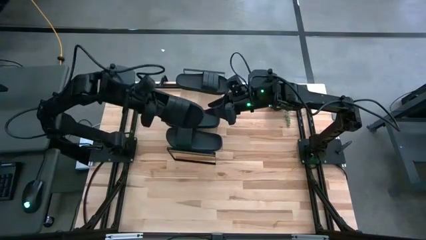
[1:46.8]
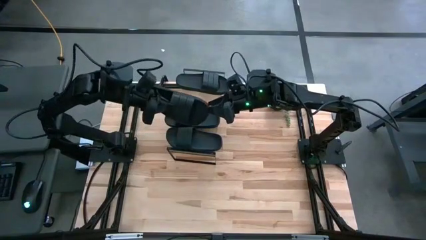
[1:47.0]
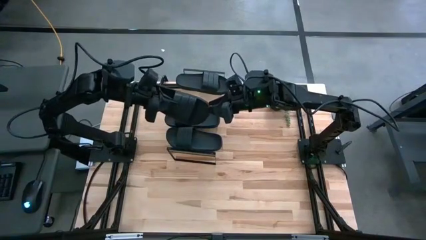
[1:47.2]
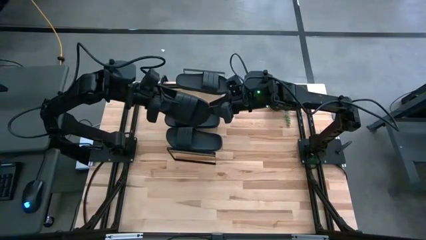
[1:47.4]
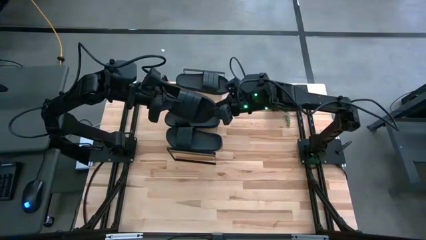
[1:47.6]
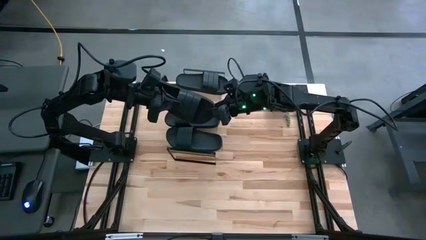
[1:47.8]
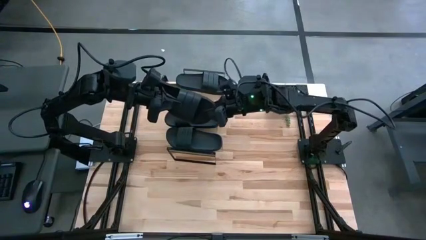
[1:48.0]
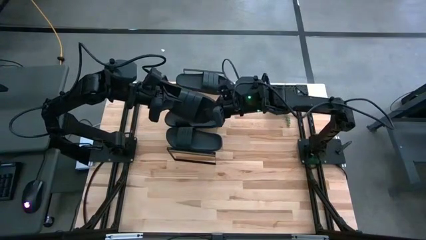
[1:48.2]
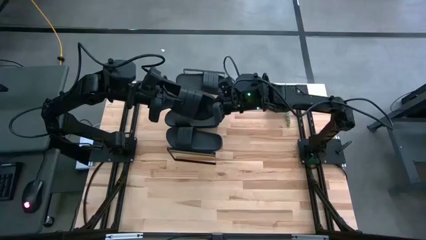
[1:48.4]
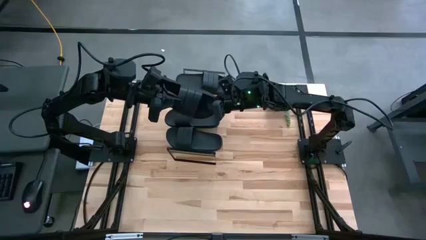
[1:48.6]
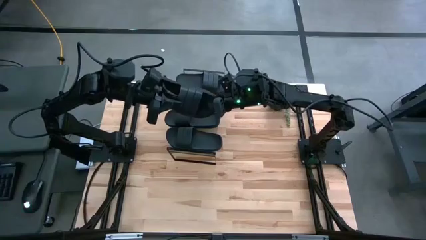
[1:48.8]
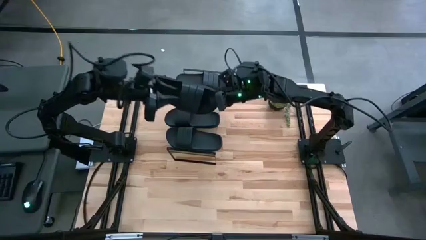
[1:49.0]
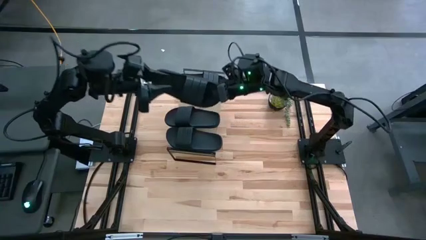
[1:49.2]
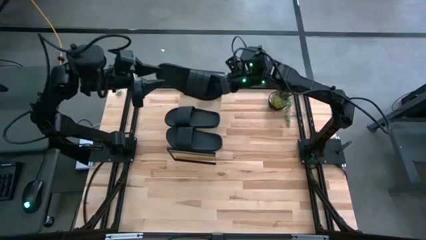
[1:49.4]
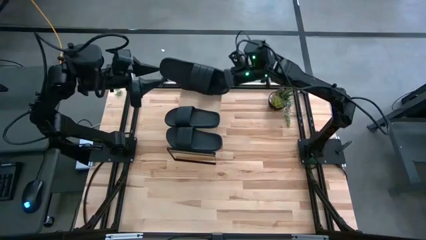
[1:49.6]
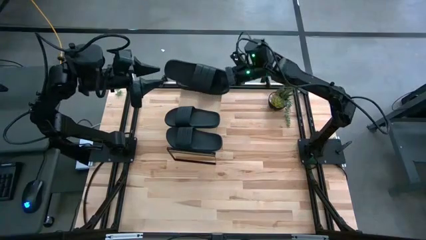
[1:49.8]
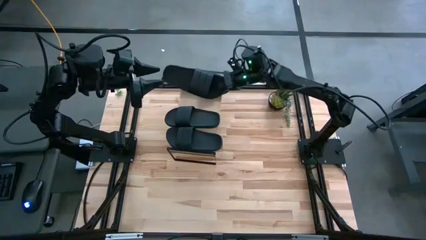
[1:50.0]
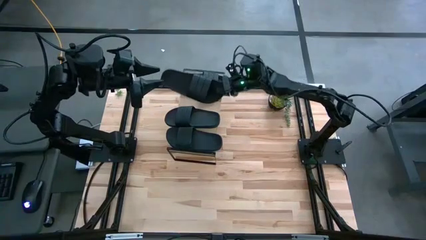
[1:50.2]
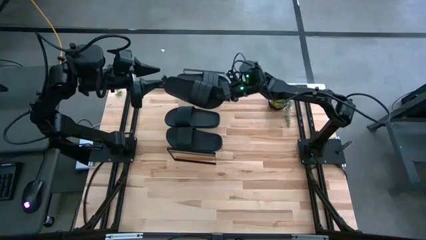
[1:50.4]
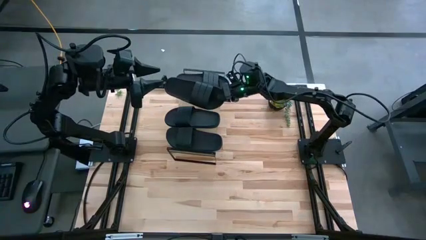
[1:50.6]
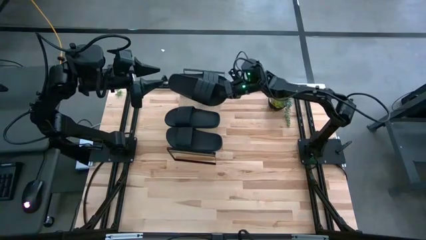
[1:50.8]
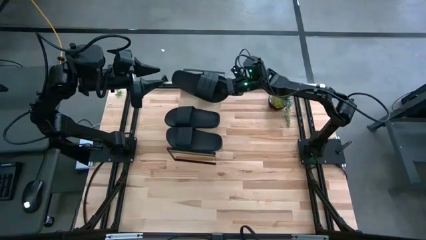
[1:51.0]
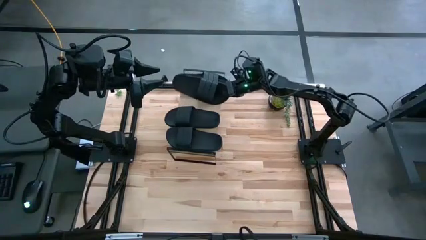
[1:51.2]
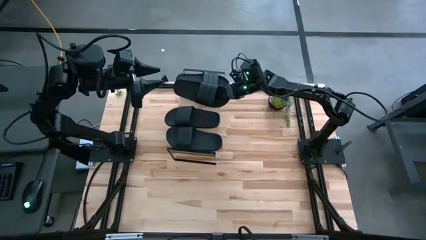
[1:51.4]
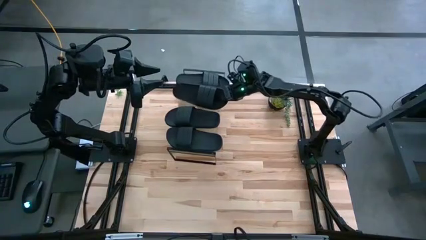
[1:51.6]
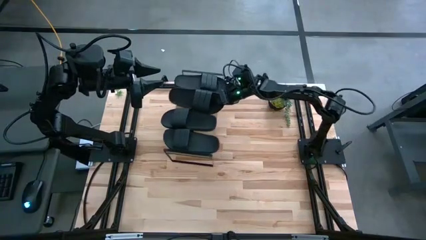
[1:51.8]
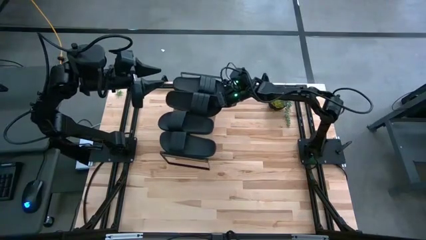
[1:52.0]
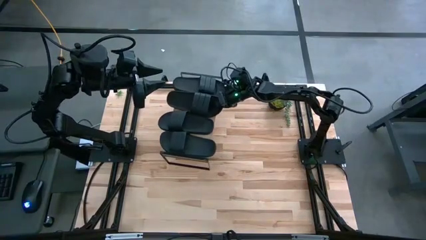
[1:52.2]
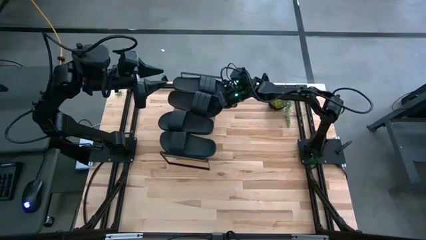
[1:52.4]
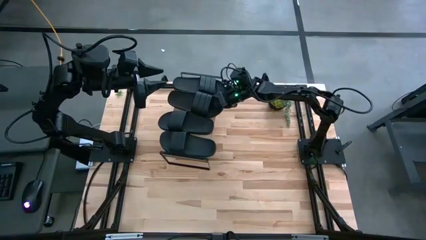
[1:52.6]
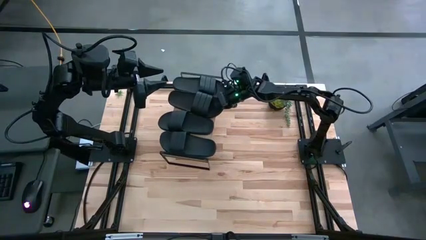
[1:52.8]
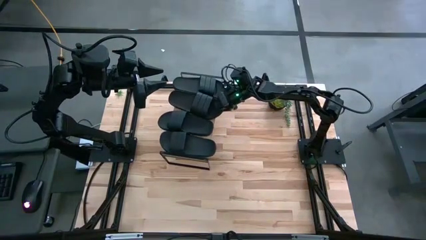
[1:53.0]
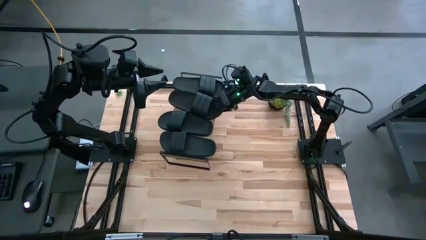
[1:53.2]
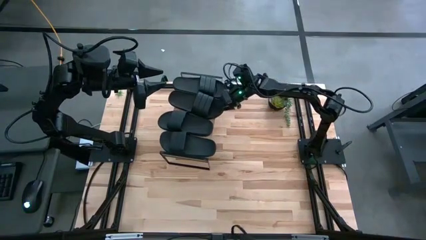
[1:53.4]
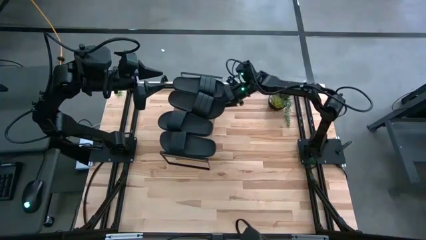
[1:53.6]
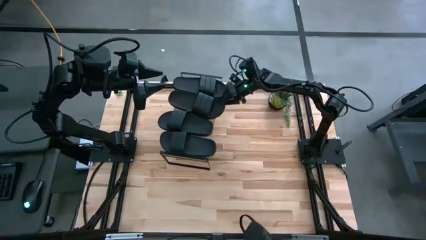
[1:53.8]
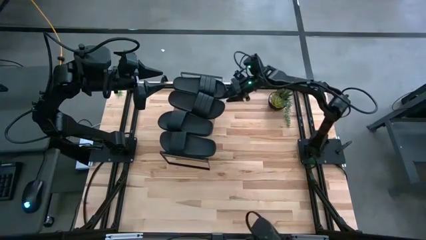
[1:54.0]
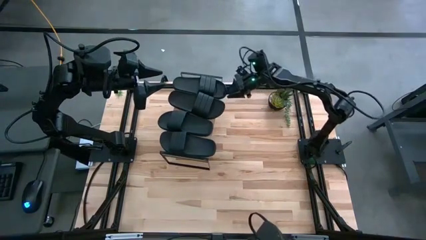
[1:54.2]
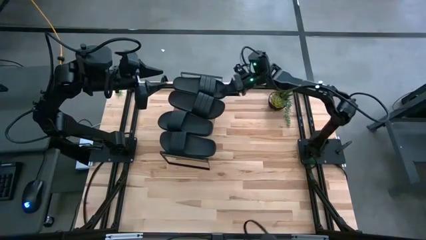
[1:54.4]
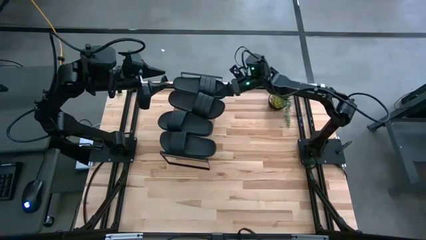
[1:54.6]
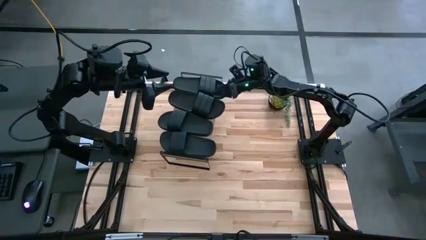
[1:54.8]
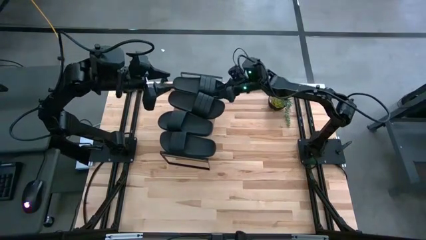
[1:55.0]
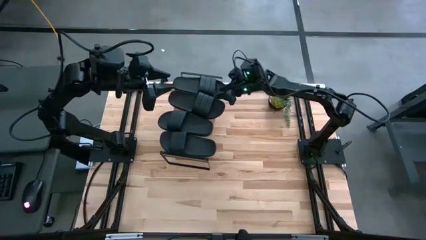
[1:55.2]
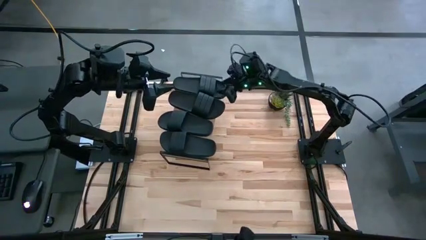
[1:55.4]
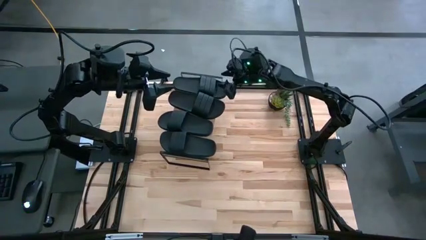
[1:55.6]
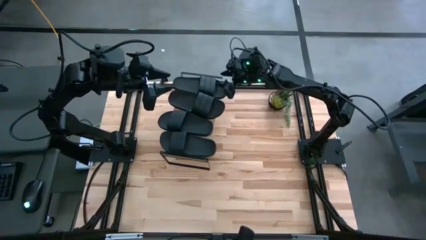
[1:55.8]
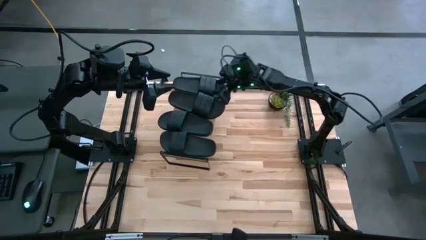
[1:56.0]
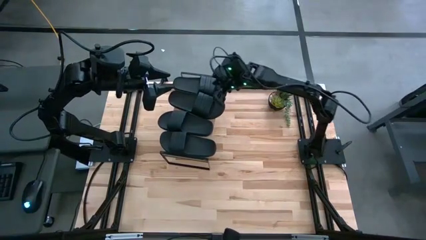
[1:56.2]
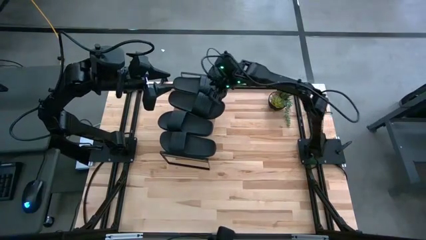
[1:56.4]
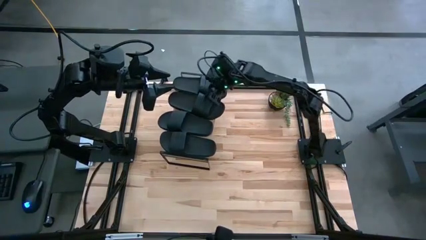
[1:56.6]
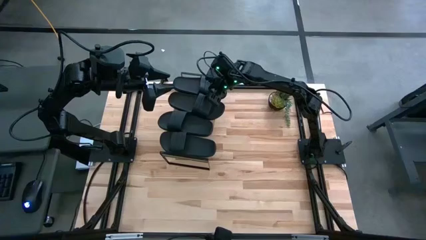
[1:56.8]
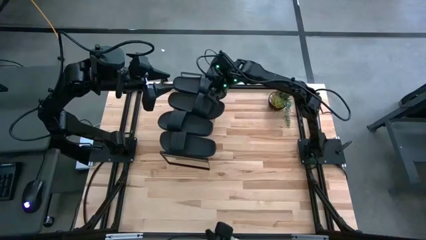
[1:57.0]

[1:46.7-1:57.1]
Task: Pick and place slides into the shelf
Put the slipper on the shelf

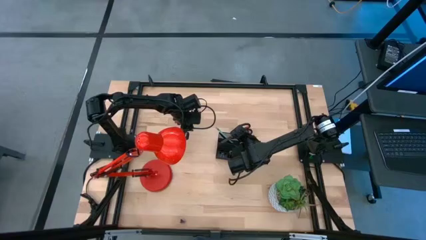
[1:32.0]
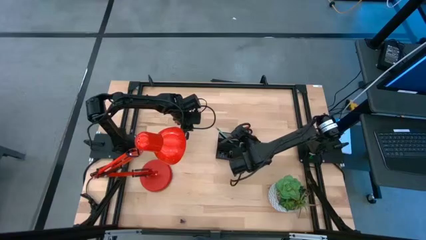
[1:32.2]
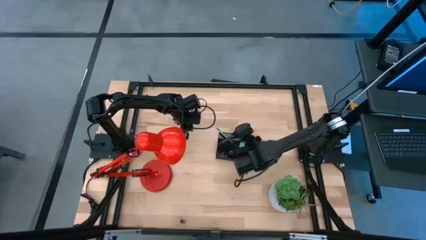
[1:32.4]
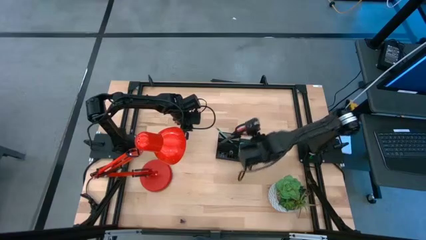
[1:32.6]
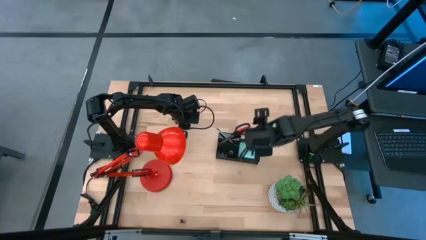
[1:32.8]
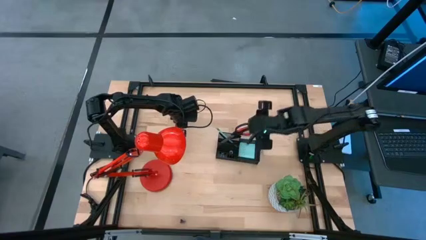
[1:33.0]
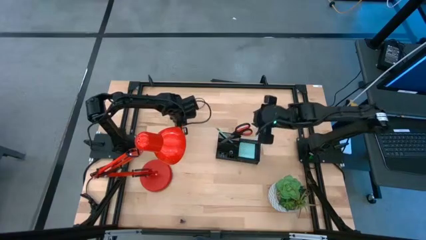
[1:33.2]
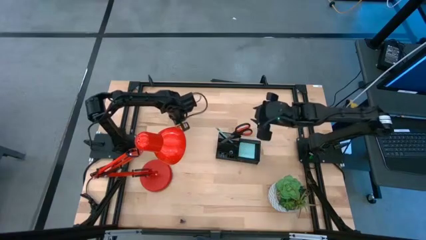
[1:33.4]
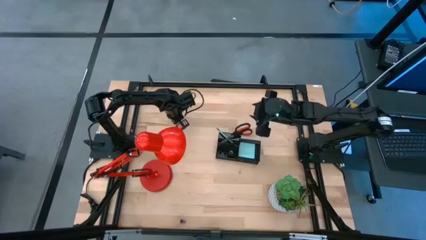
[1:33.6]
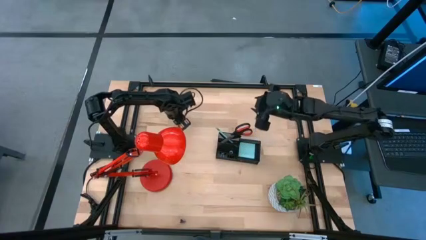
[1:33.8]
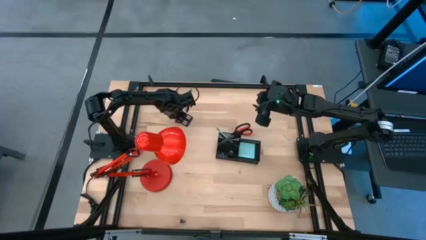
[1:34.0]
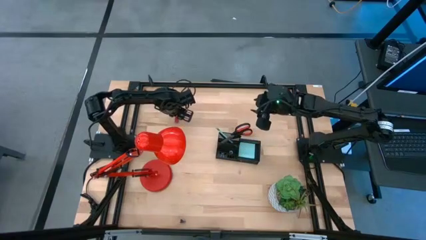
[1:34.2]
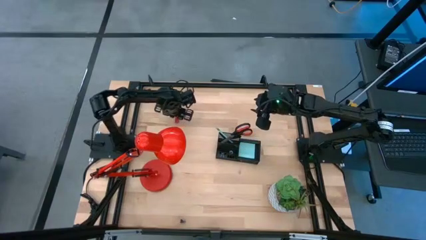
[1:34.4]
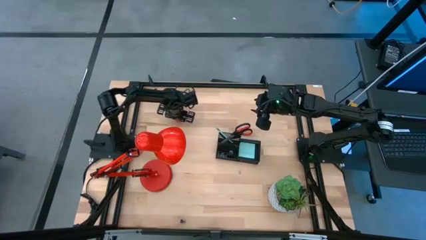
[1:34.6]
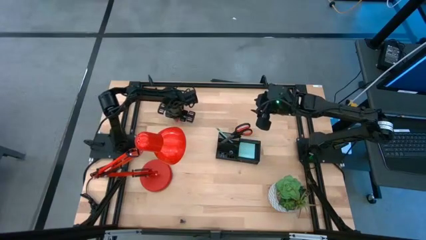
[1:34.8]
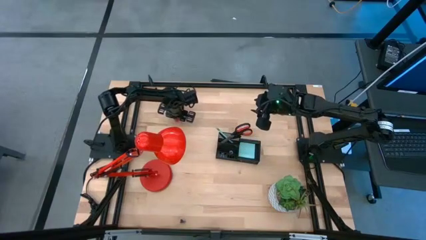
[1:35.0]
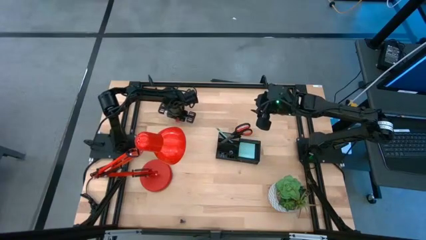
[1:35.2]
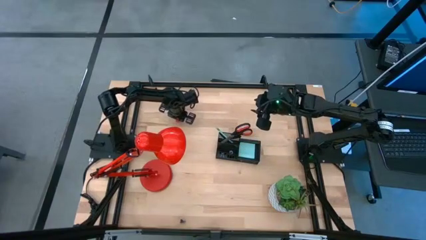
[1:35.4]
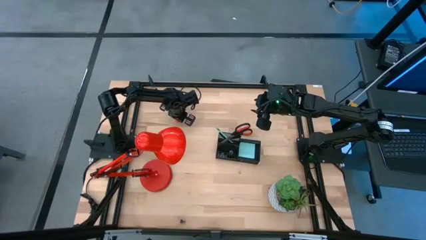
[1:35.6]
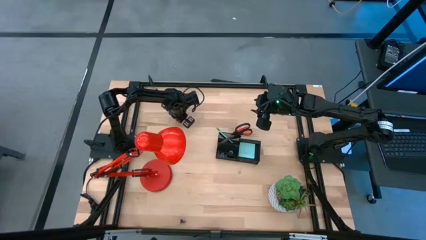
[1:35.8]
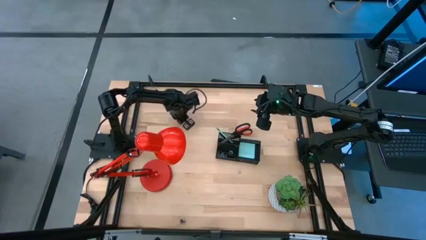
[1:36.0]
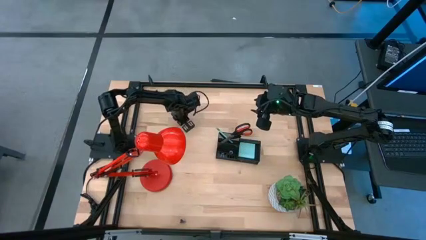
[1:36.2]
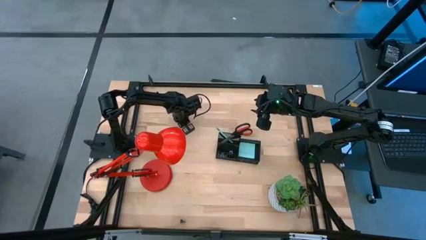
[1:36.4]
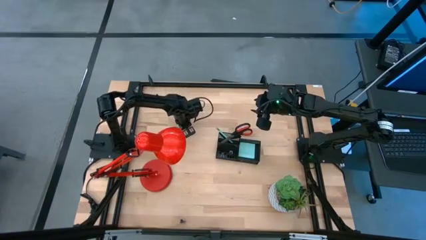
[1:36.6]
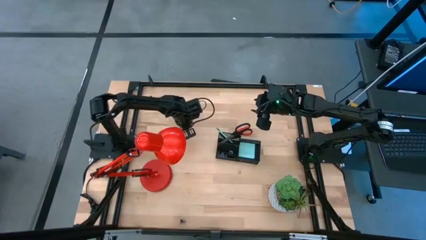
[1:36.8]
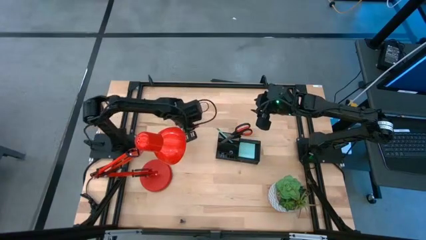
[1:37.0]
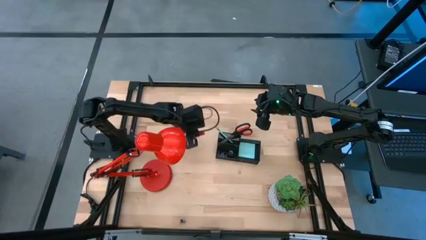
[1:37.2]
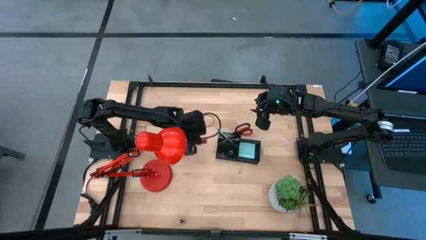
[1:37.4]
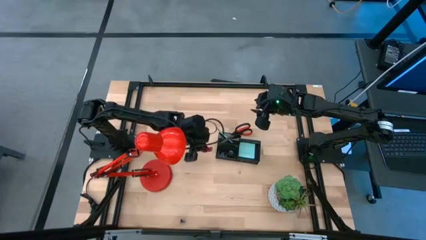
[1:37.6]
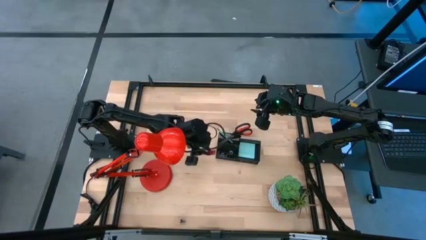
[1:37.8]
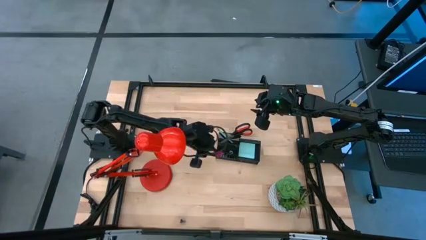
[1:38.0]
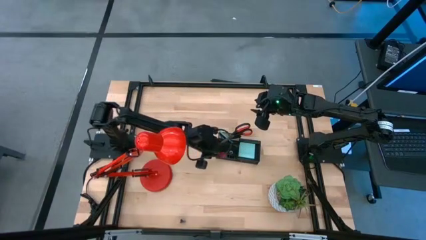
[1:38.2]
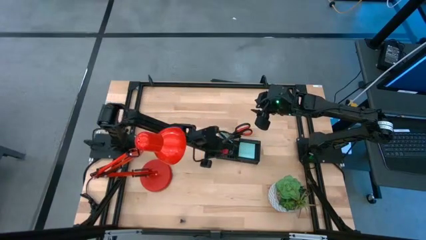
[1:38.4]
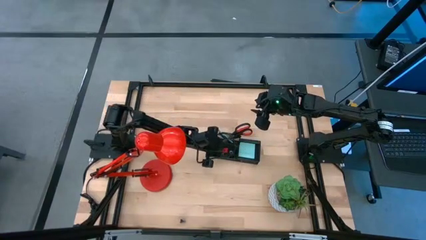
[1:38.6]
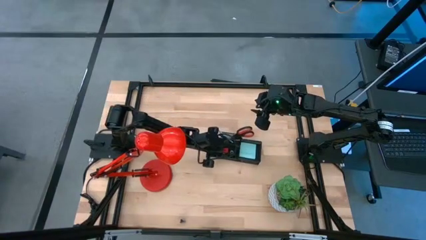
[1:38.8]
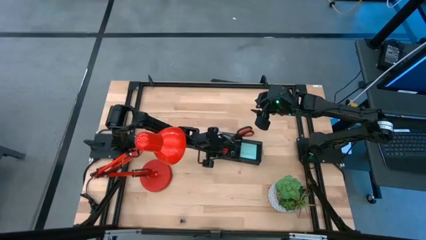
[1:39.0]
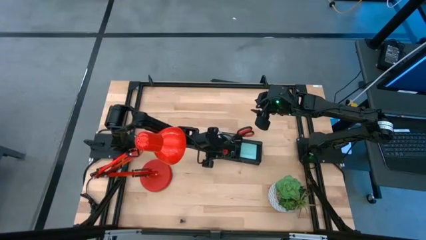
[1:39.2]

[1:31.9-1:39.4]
Task: Pick and place office supplies into organizer
Put the red eraser into the black desk organizer
